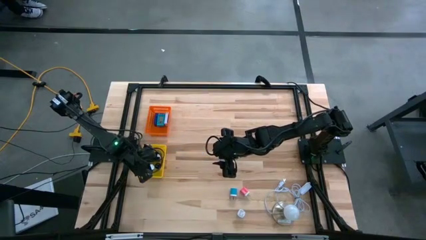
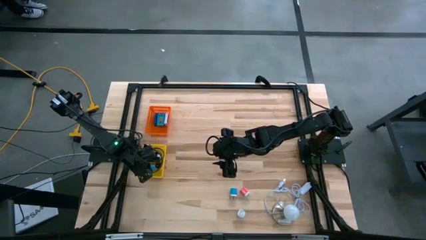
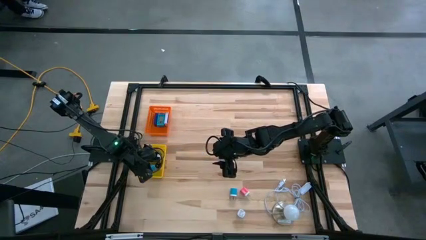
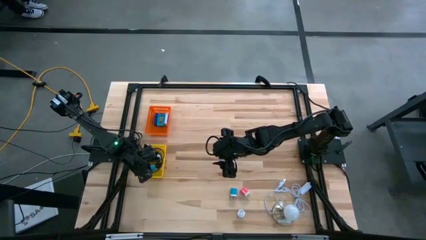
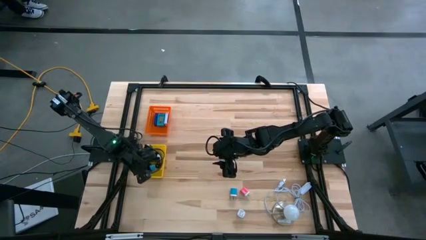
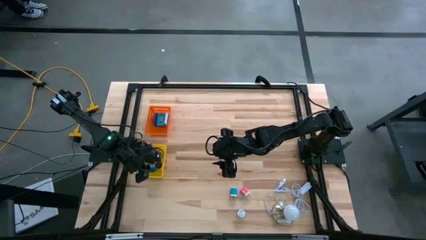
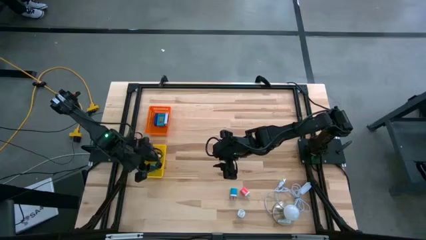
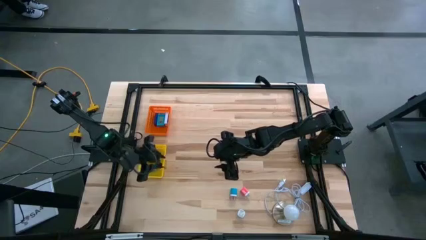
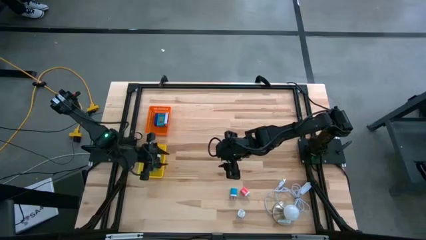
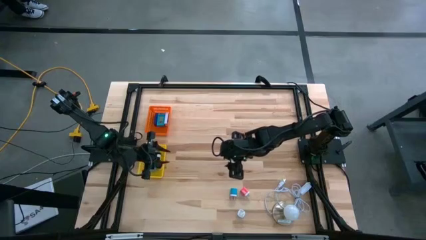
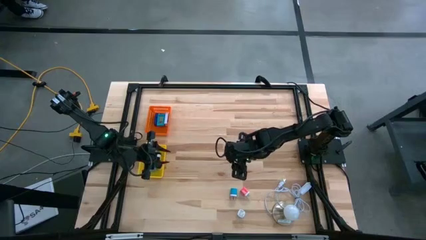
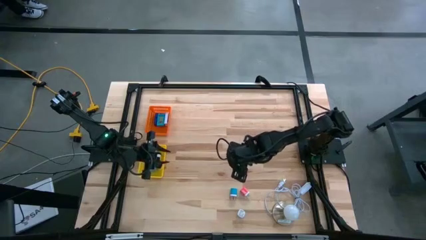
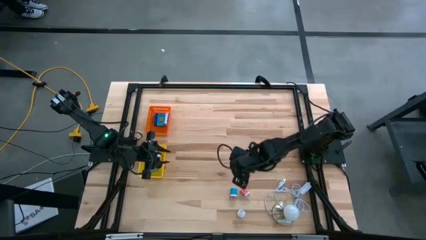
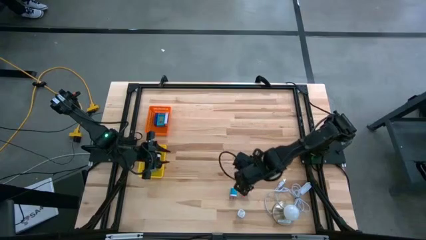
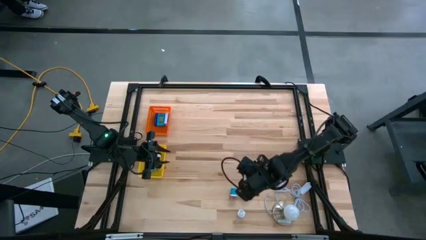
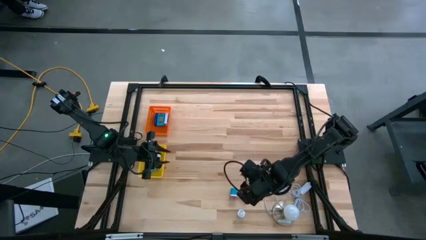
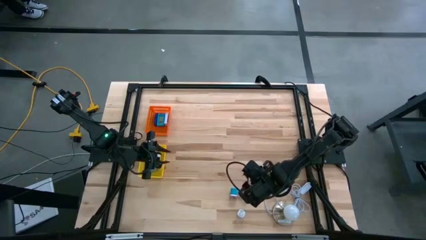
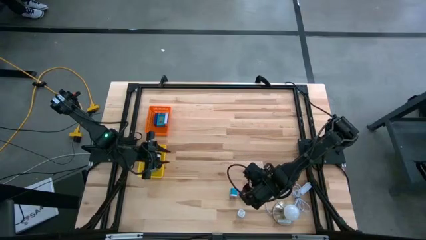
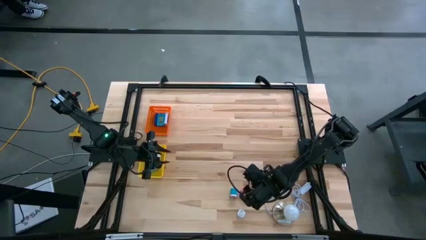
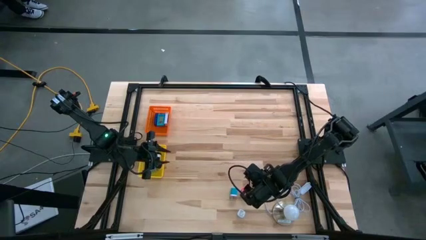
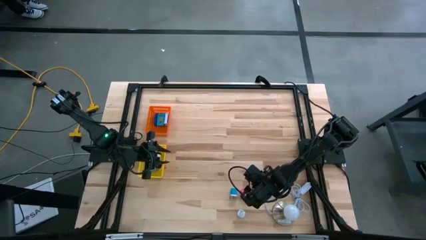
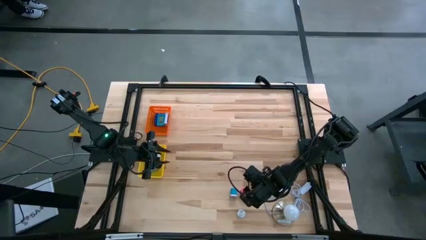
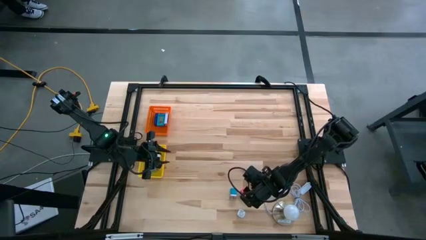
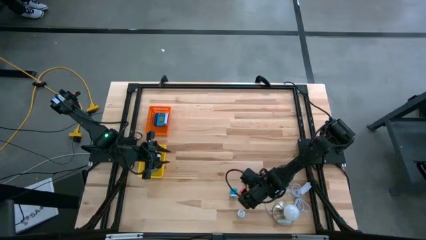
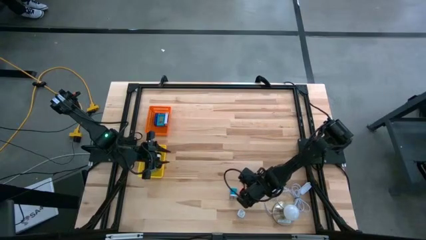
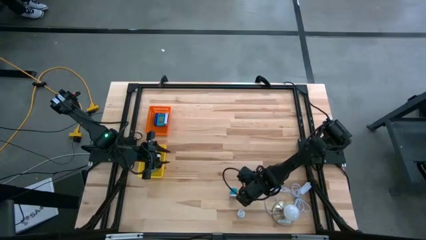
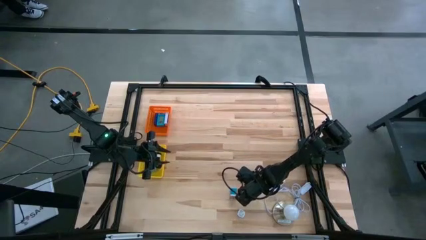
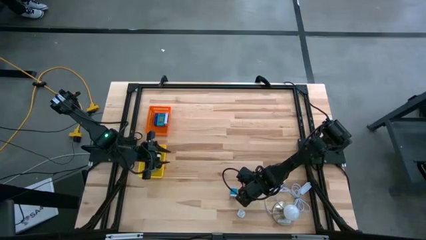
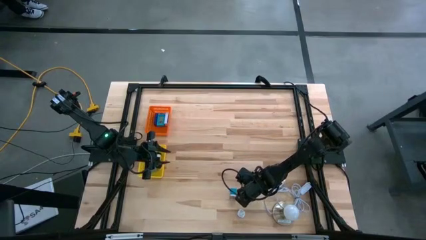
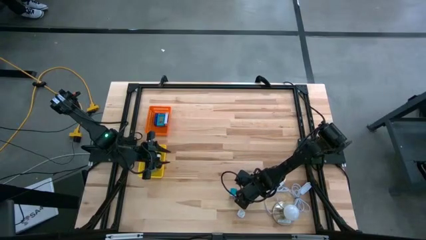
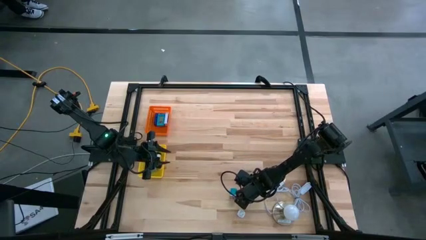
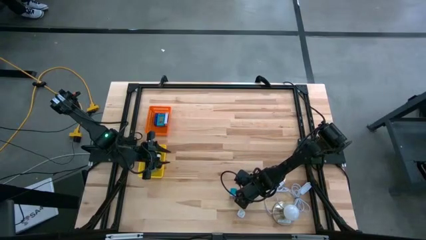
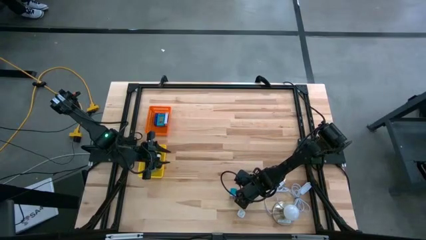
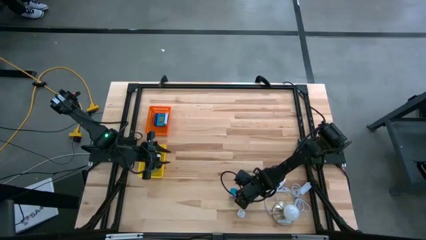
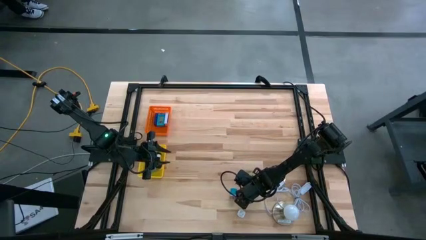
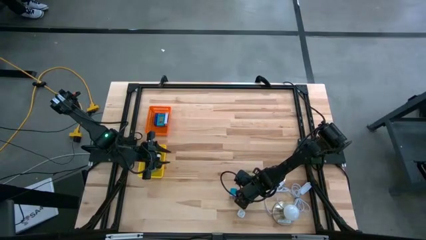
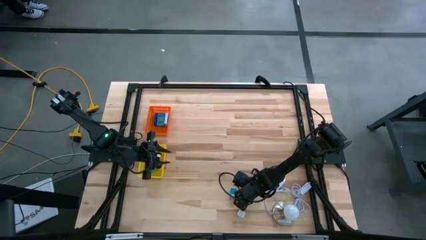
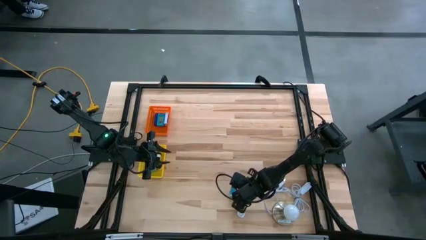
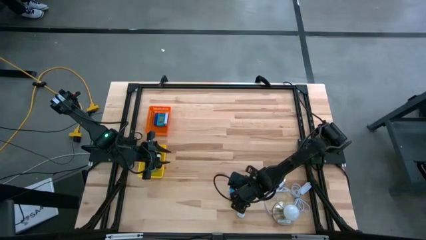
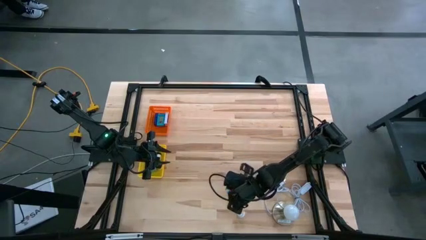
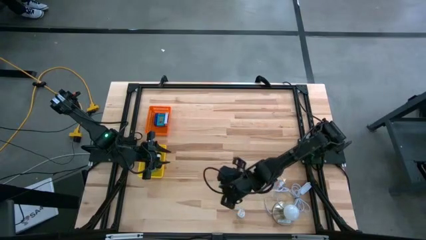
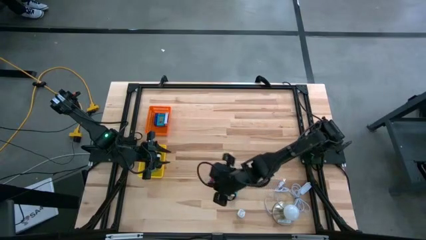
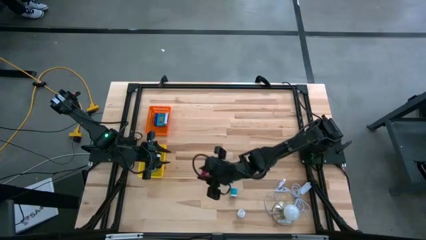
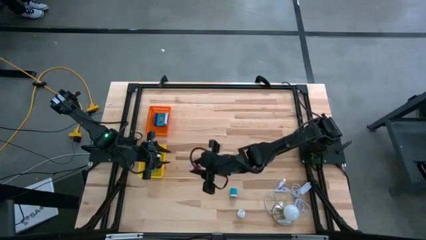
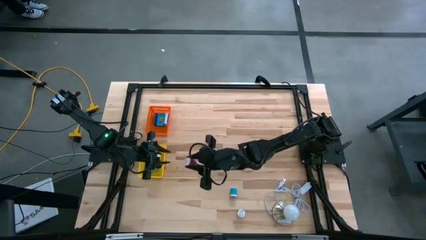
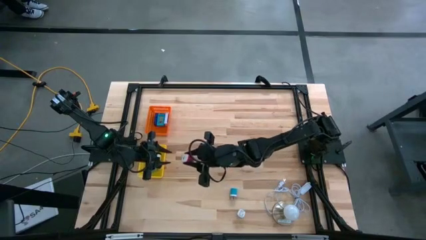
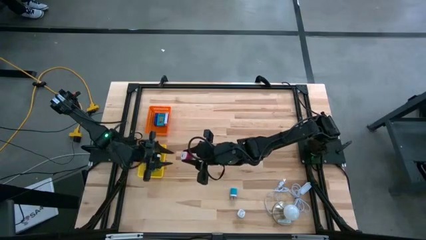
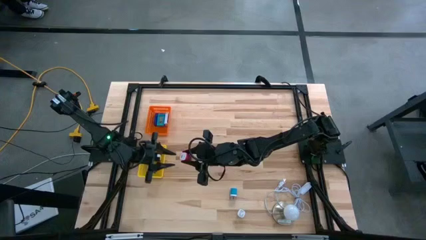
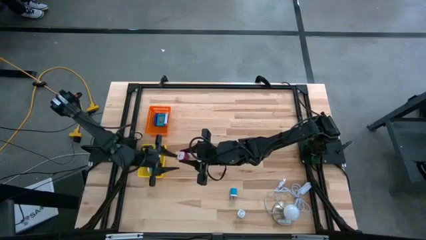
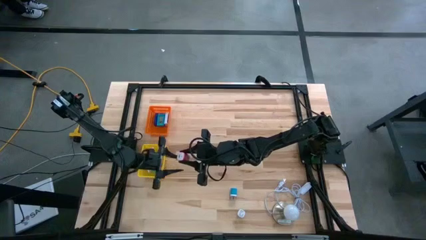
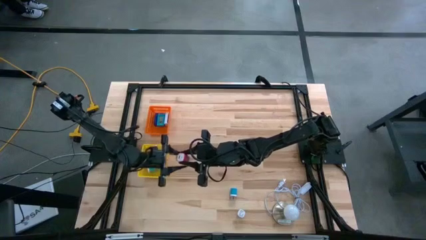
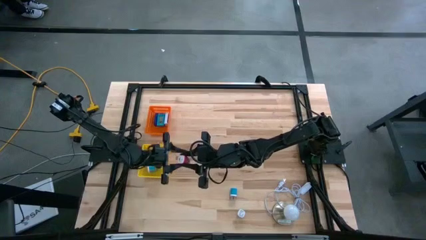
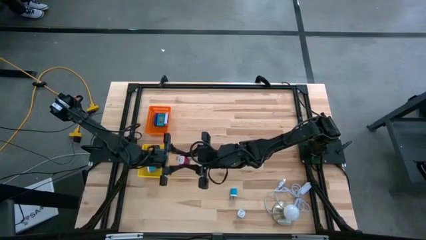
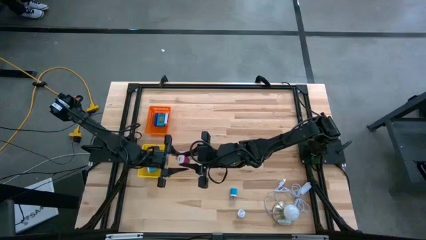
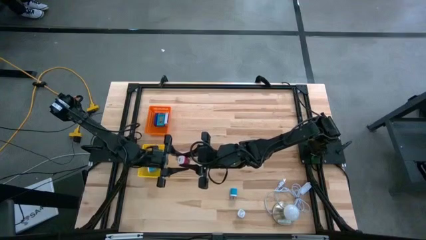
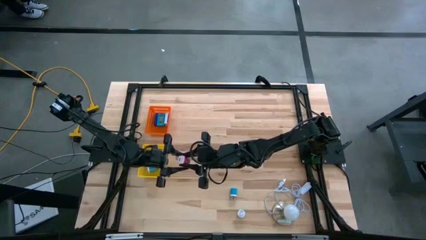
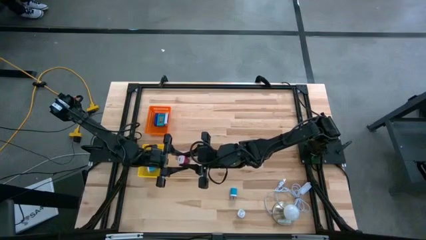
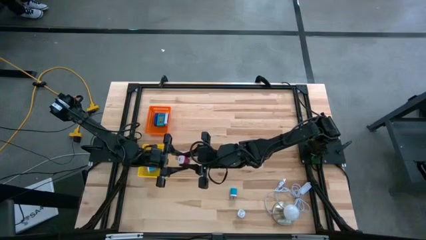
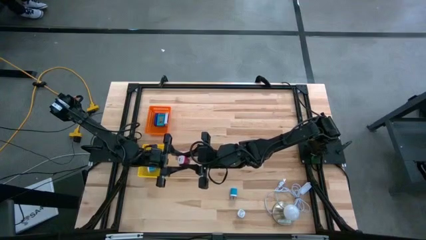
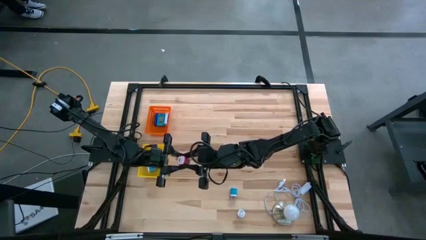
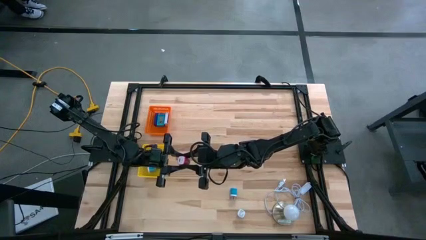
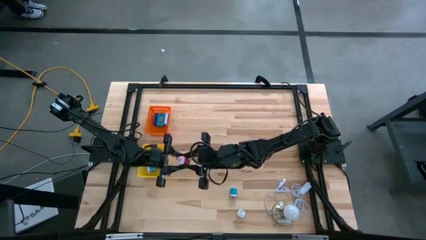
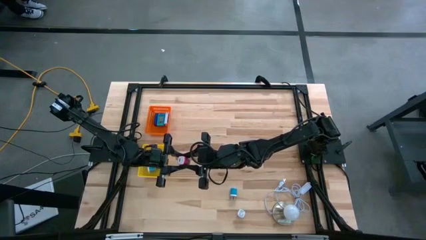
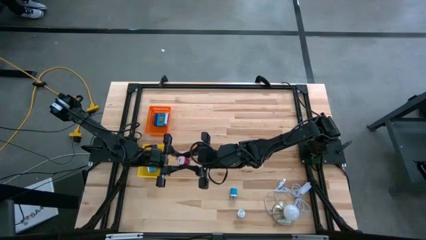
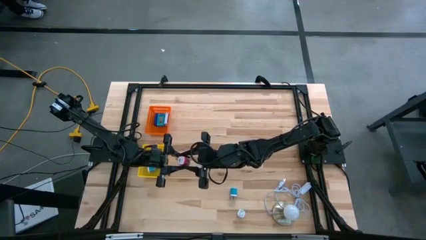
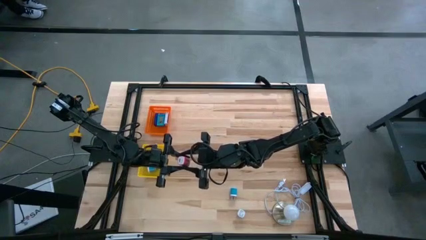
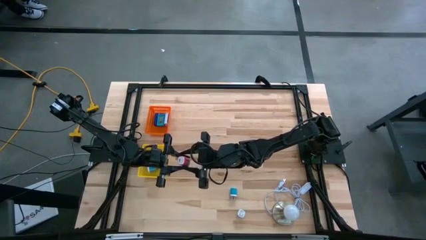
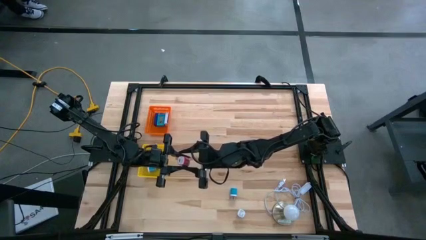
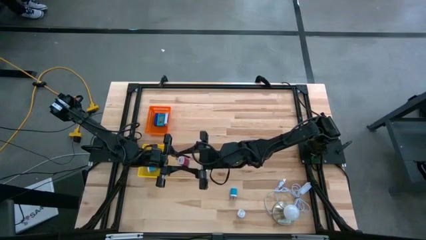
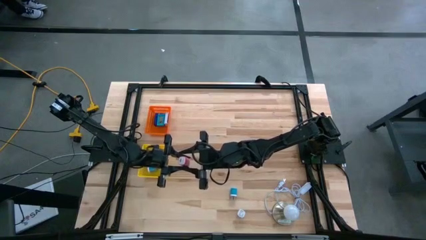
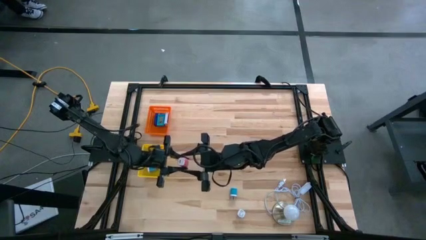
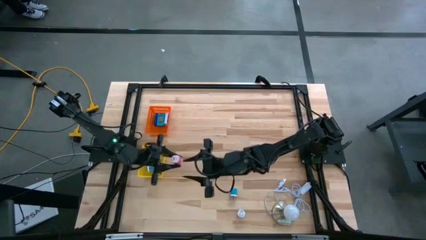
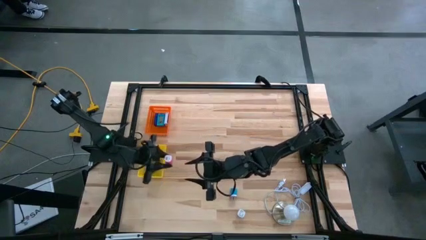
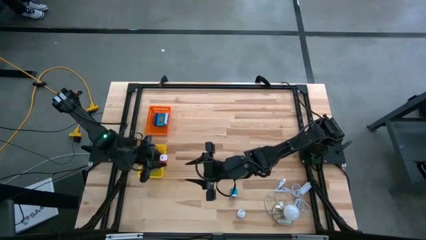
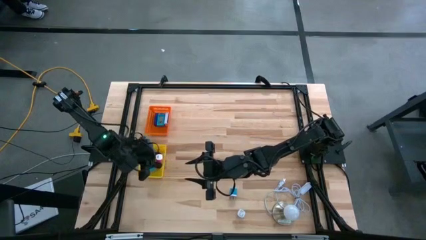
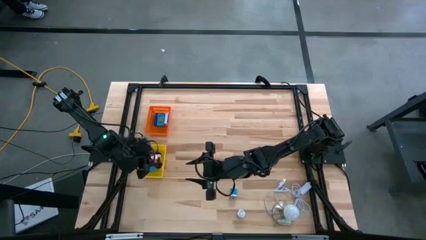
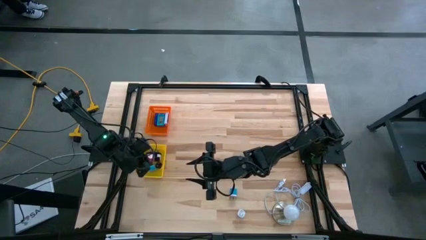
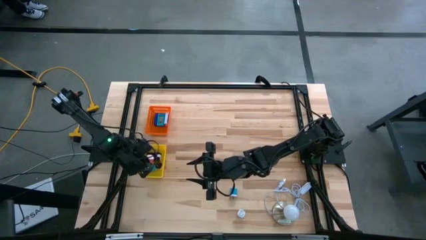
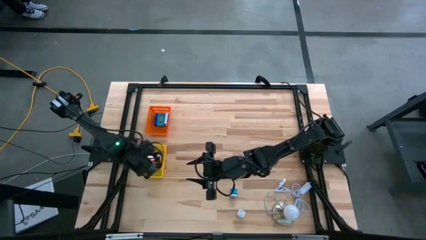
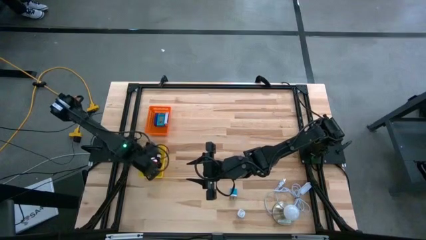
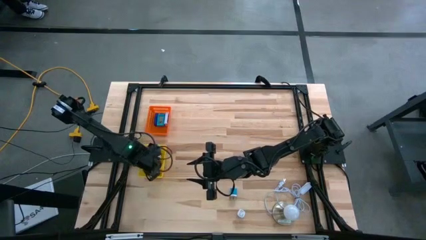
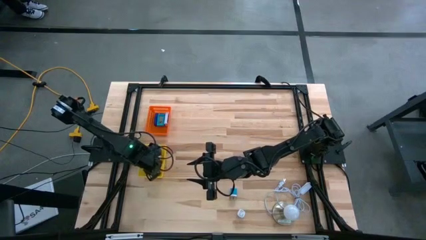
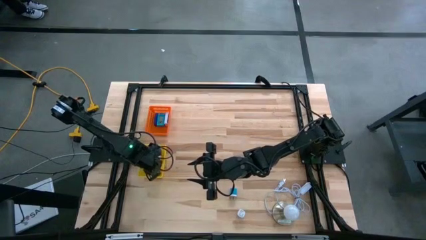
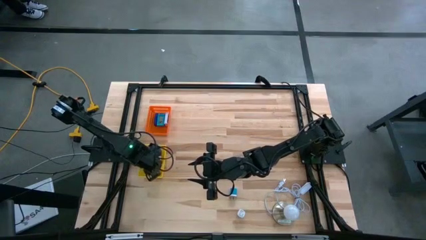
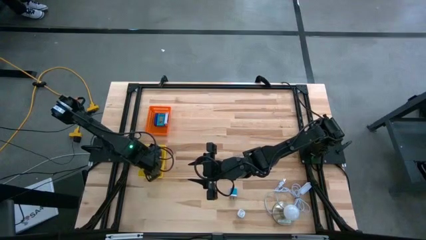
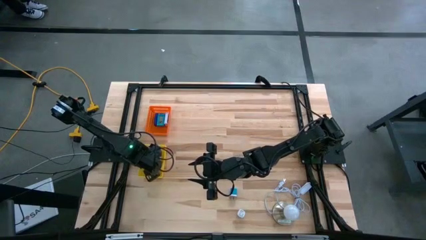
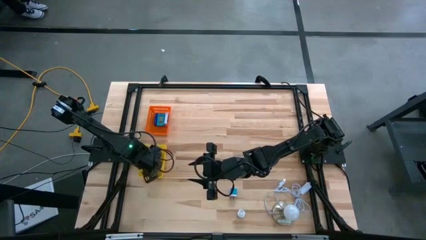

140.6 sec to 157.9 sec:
Task: Pick & Place Office items
Put the pink charger adapter into the yellow basket
